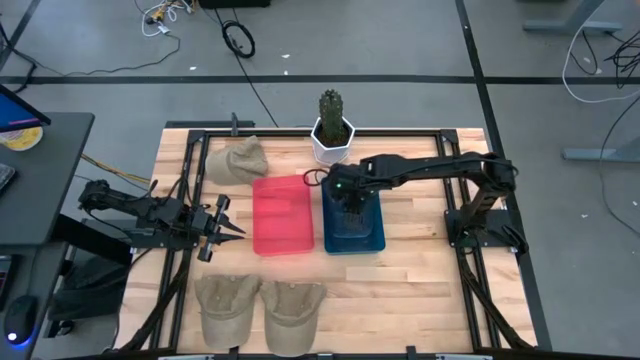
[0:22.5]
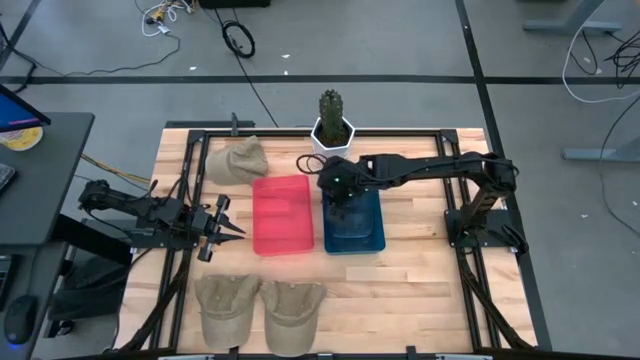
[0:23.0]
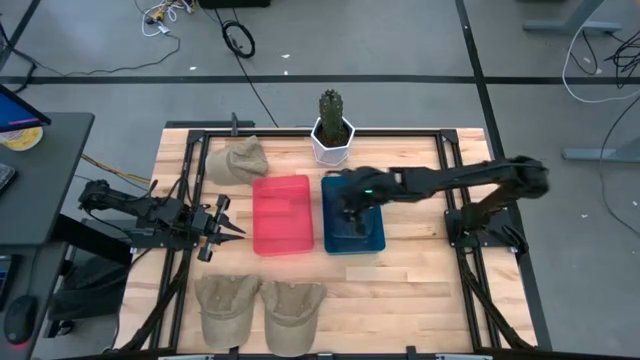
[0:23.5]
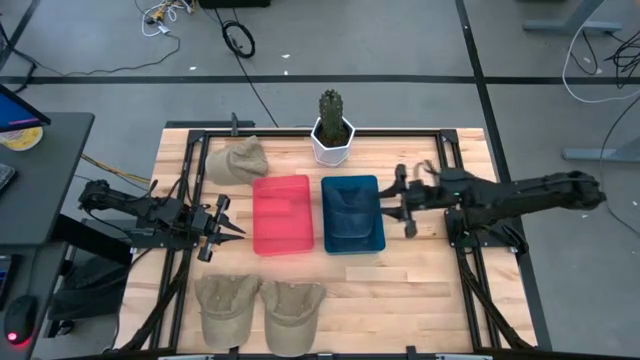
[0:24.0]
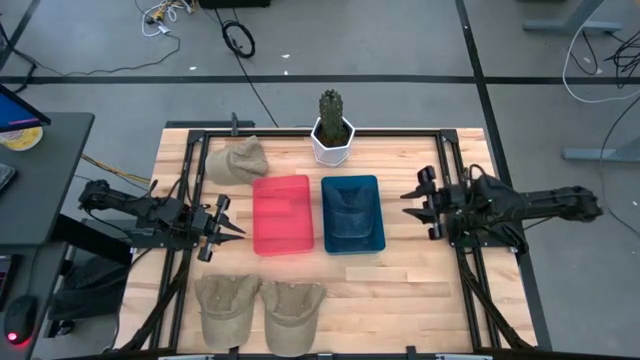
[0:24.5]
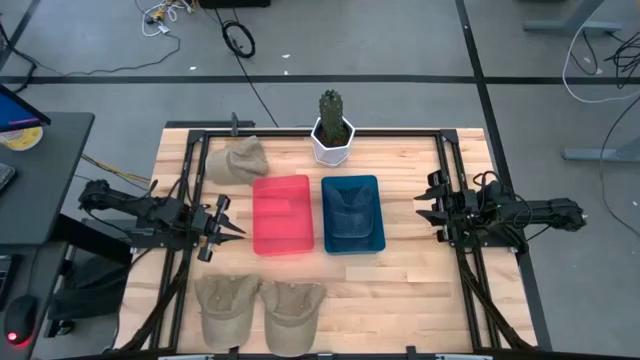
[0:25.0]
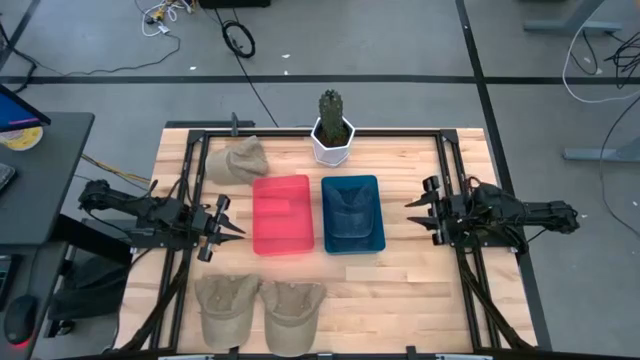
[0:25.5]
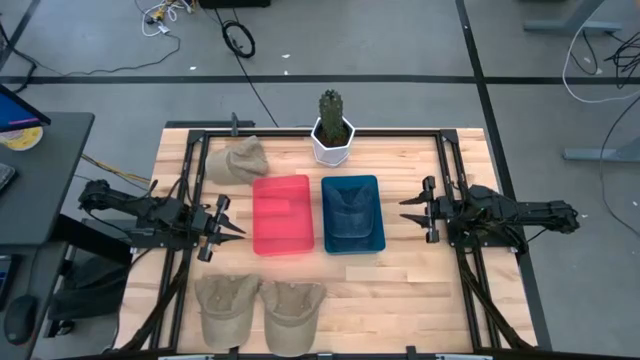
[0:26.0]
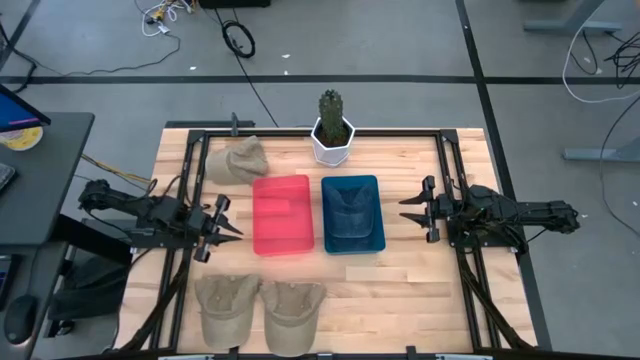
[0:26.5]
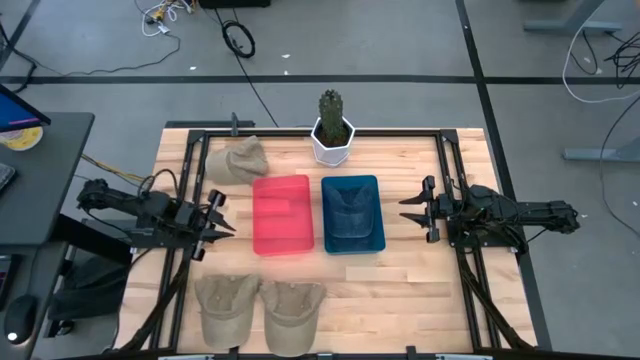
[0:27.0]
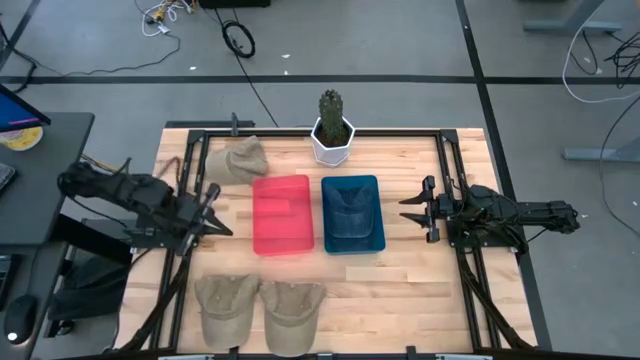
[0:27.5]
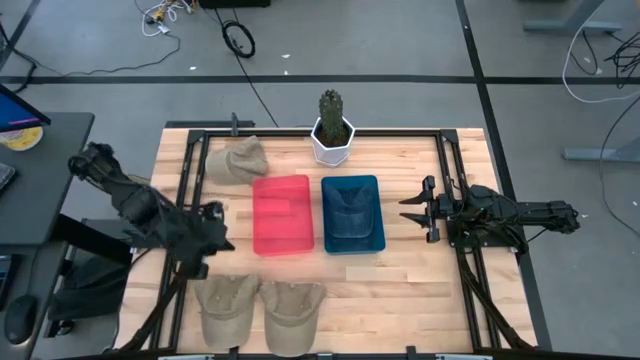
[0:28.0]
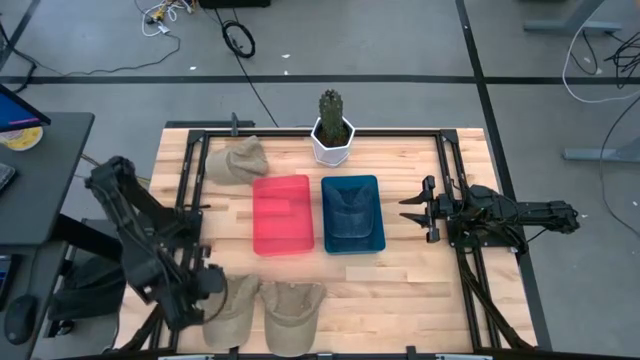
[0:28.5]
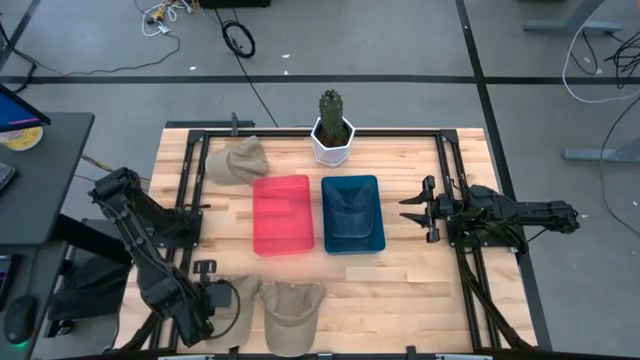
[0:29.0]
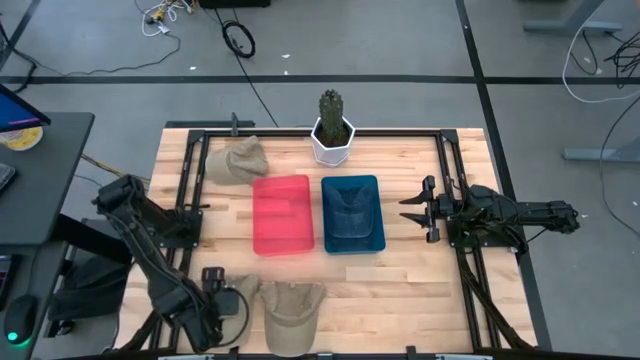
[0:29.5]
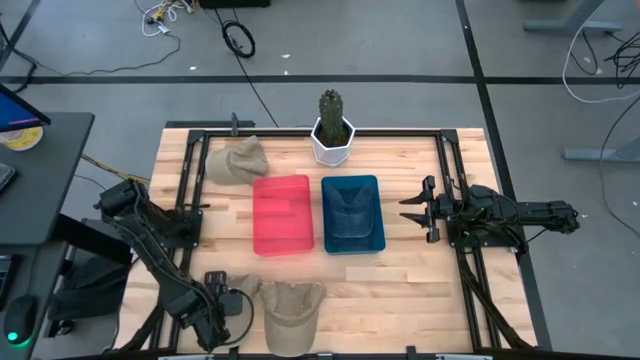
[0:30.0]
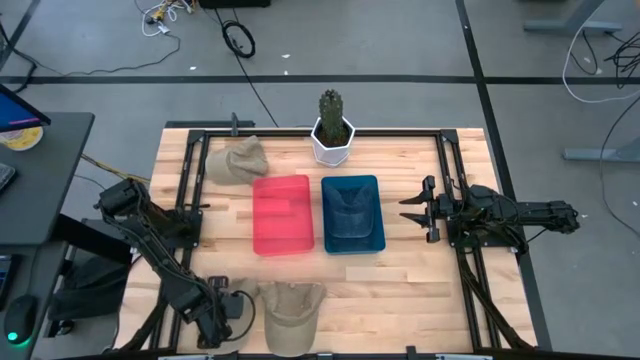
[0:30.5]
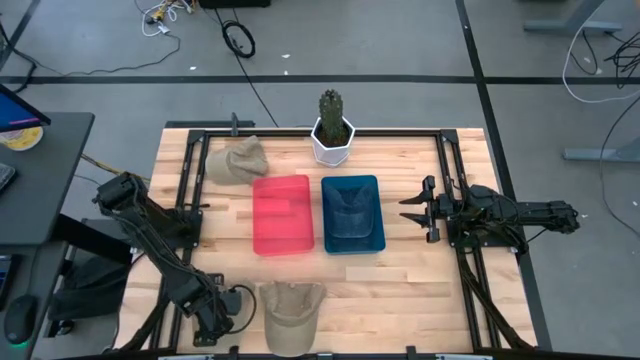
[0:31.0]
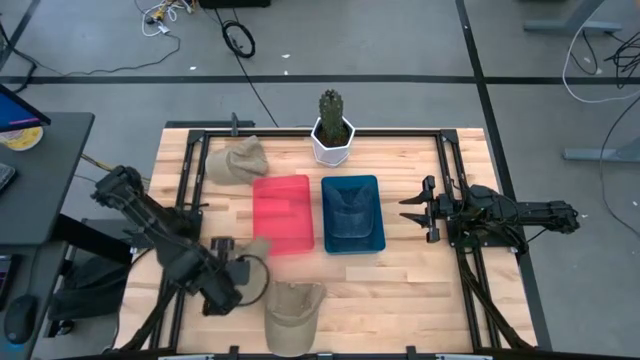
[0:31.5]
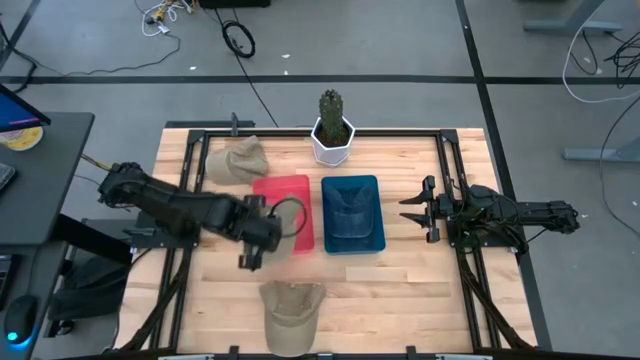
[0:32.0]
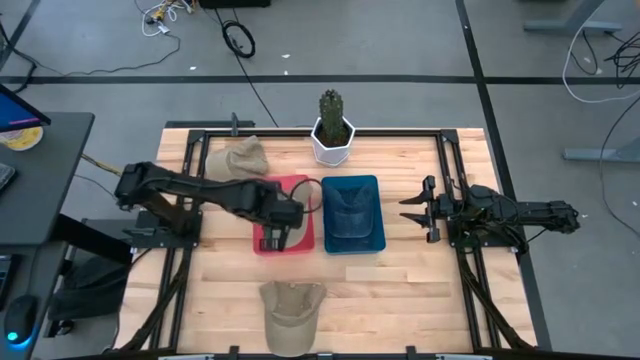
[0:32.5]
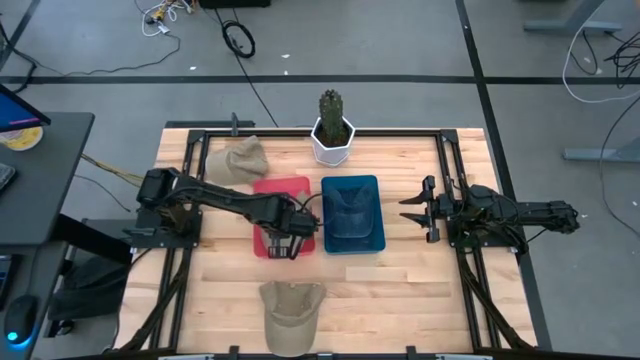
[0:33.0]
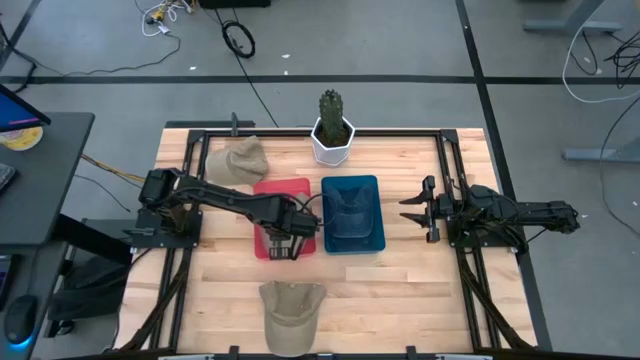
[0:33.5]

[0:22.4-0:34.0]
Task: Pick & Place hat
Put the bottom left light brown cup into the red bin

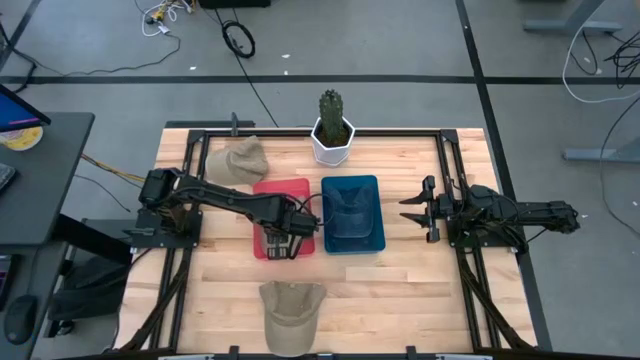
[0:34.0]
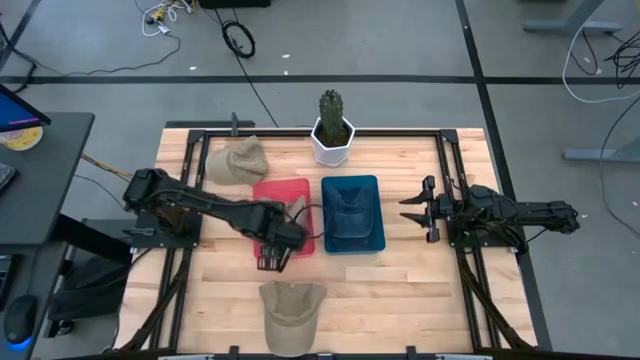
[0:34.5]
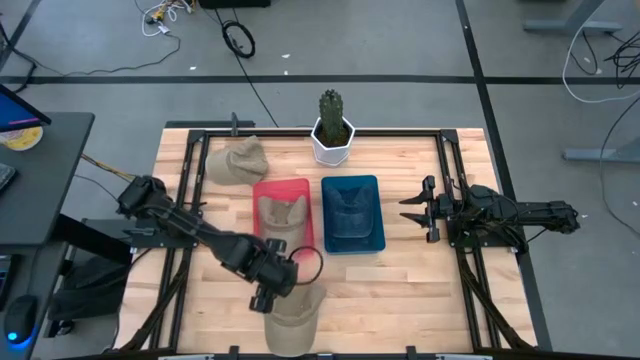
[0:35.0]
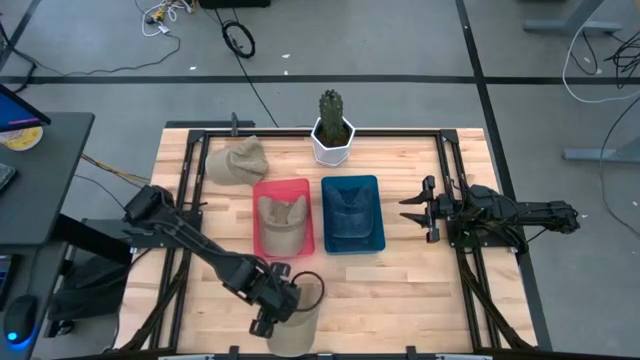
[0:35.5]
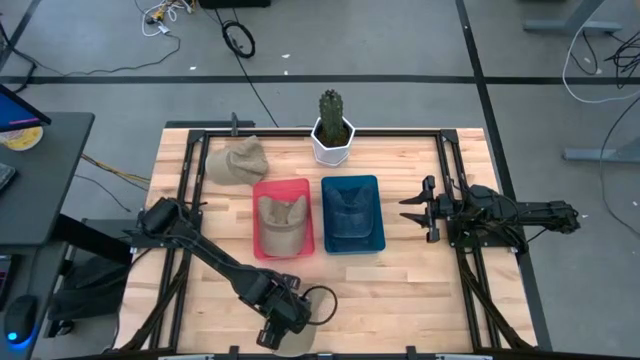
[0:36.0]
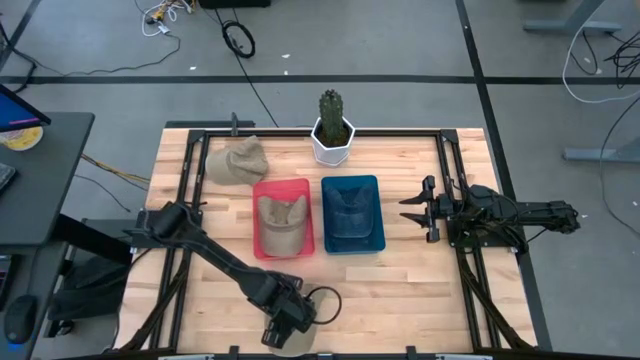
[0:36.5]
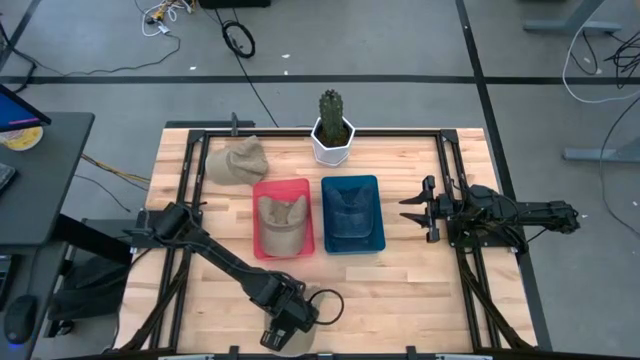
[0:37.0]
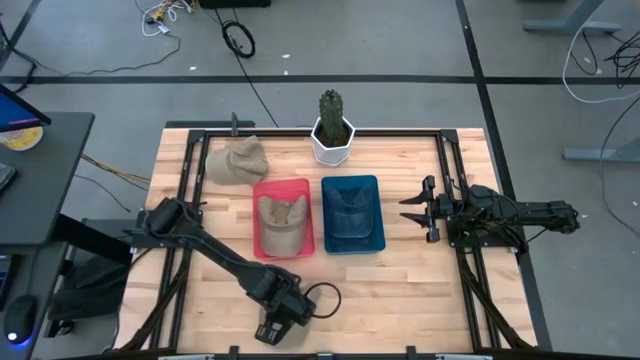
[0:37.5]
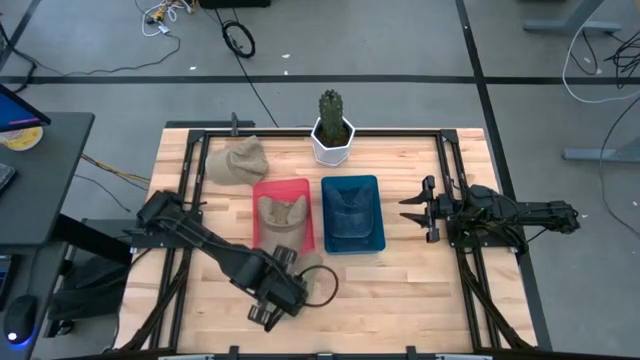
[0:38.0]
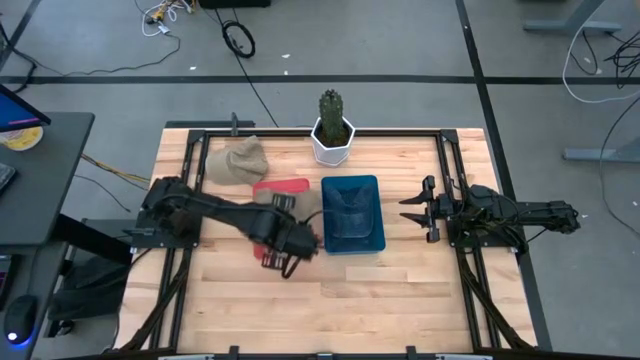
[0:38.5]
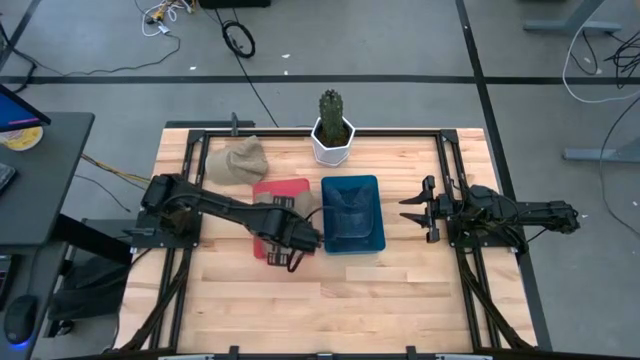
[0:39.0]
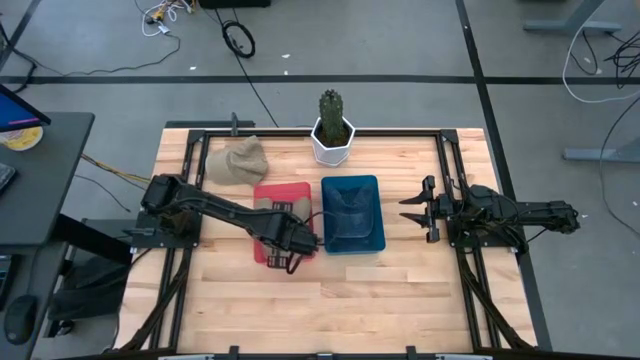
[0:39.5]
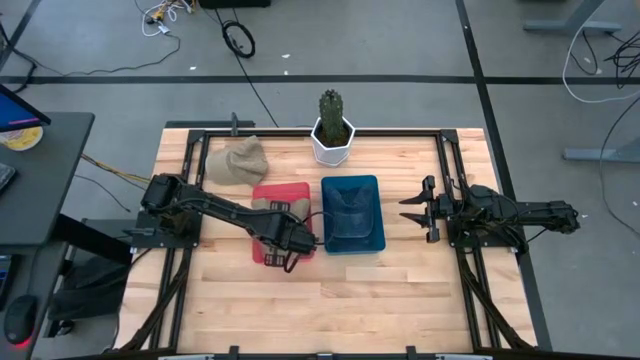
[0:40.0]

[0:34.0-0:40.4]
Put the bottom light brown cup into the red bin

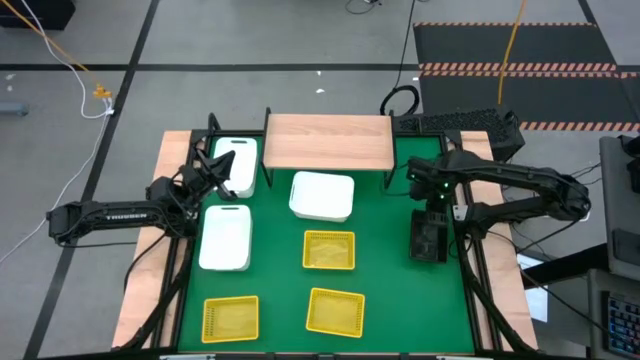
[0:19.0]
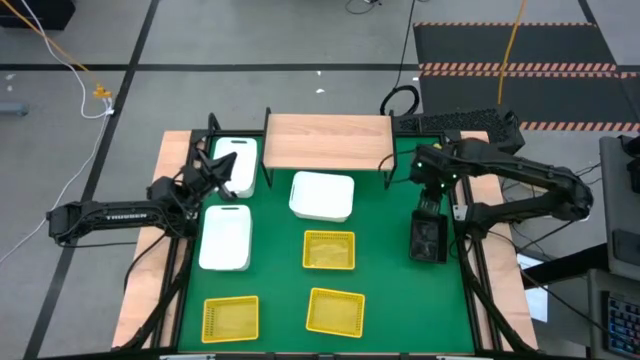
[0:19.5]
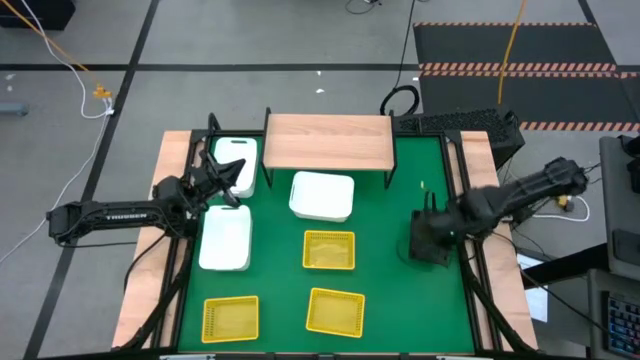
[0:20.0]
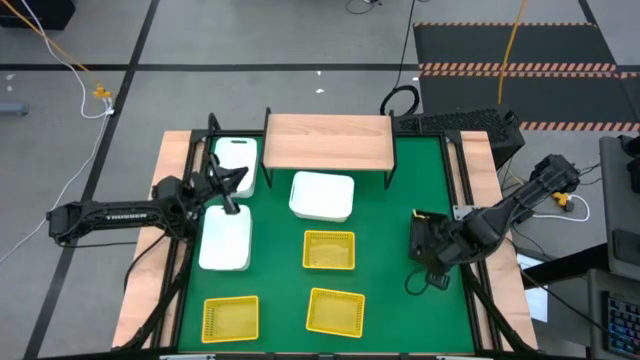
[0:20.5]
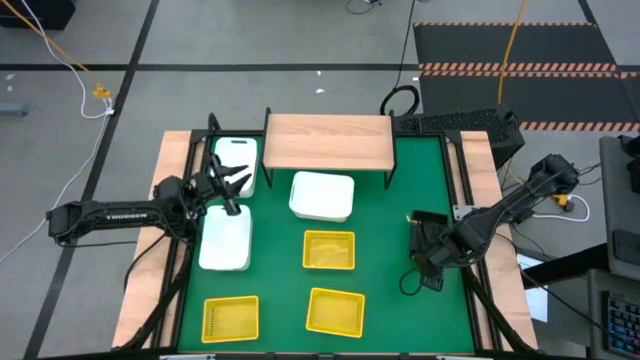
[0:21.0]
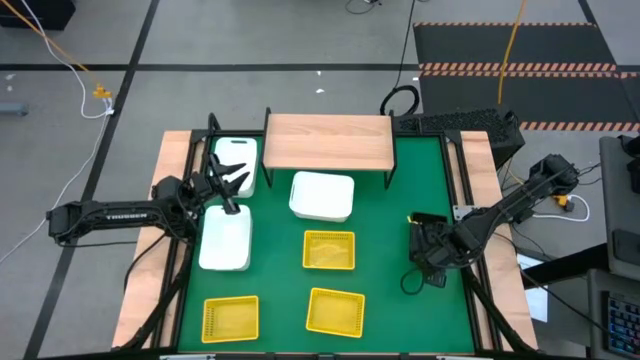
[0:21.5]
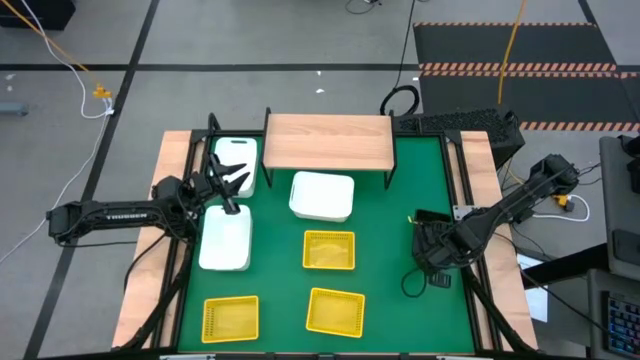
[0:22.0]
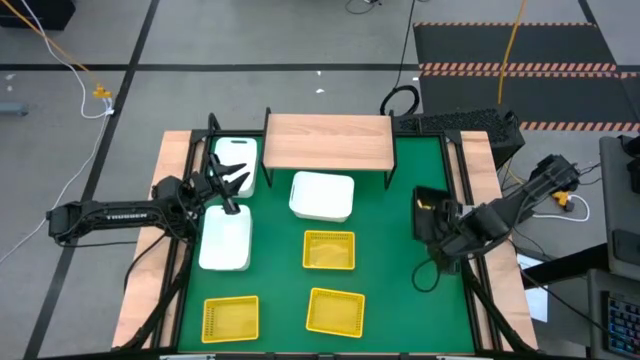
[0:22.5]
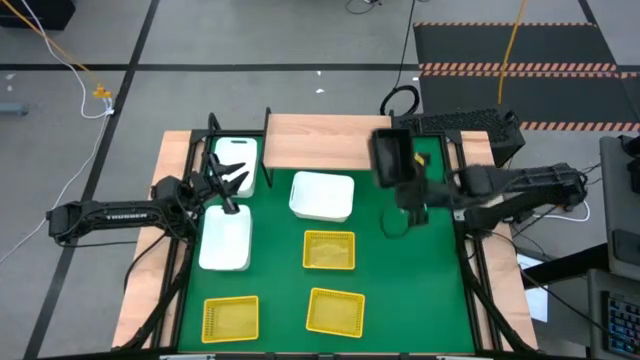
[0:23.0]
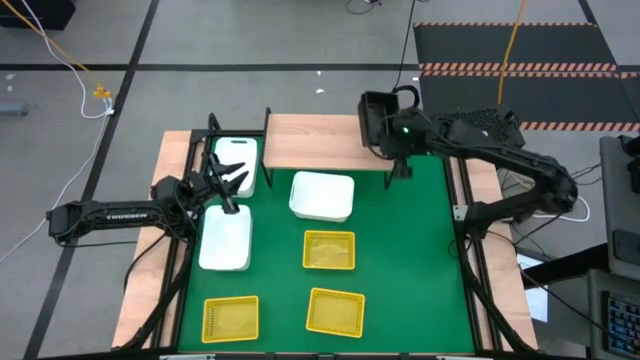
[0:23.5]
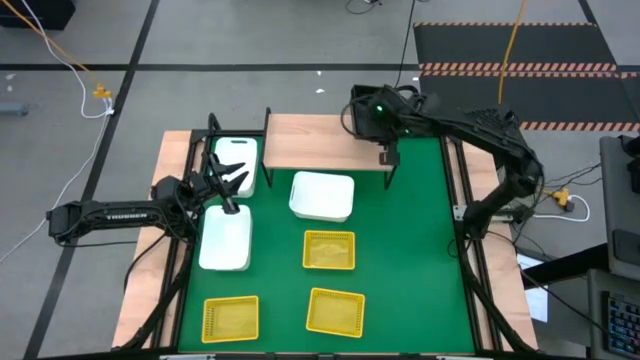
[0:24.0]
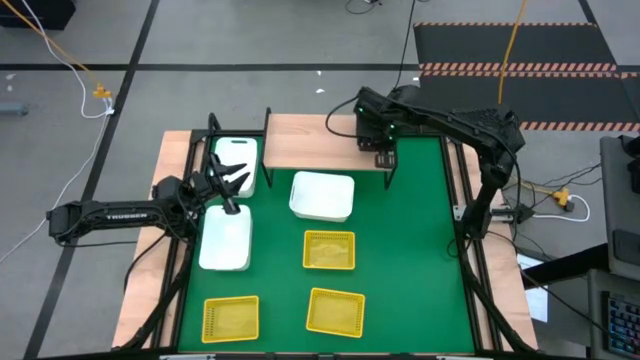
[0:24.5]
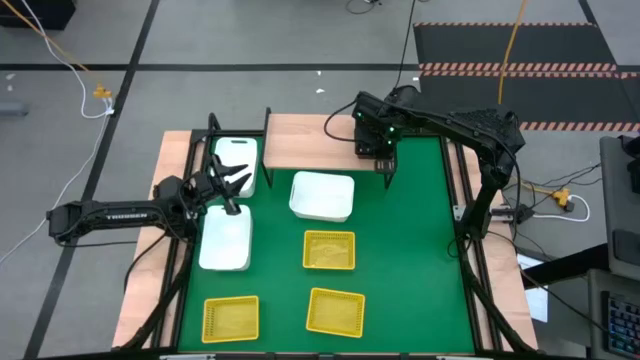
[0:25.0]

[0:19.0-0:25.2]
Task: Stack baskets on shelf by color
Put the stack of black bins on the shelf
